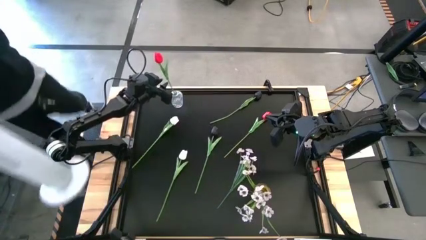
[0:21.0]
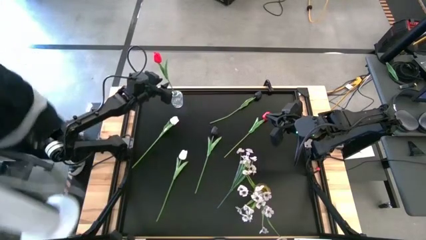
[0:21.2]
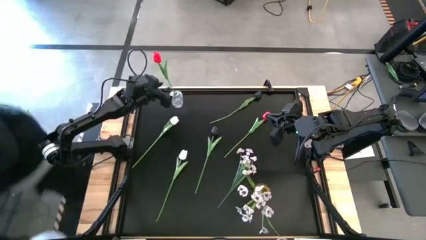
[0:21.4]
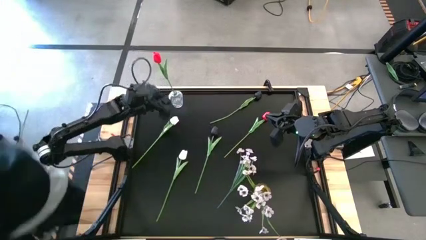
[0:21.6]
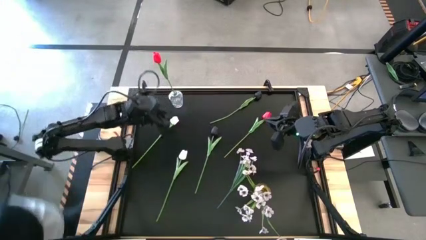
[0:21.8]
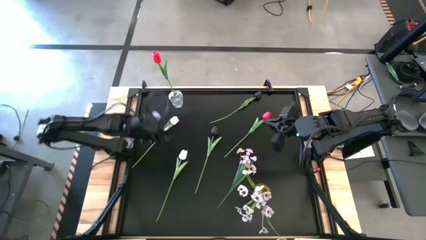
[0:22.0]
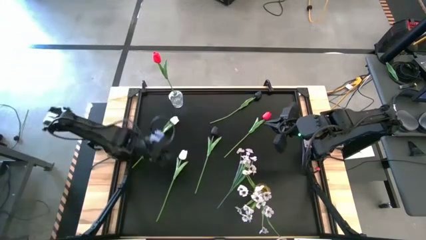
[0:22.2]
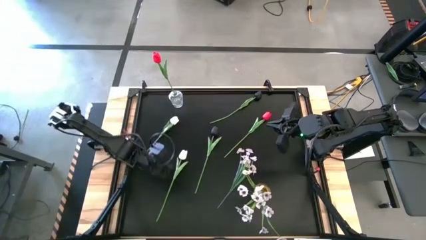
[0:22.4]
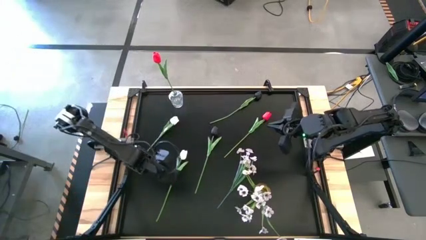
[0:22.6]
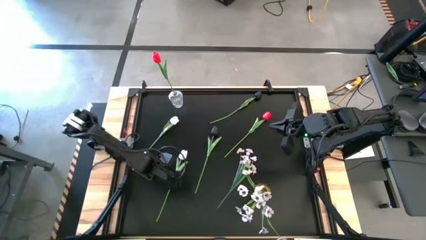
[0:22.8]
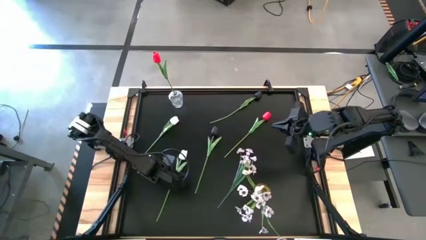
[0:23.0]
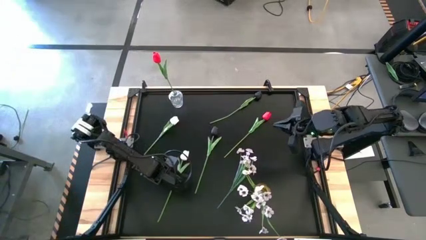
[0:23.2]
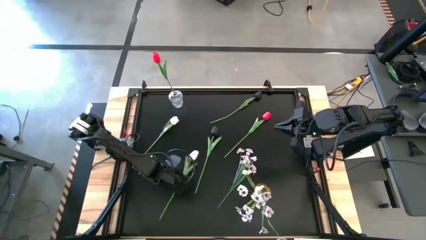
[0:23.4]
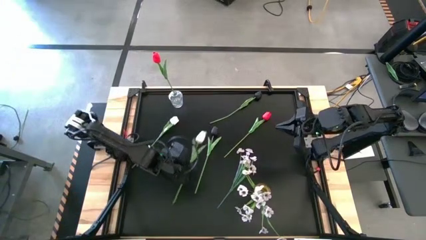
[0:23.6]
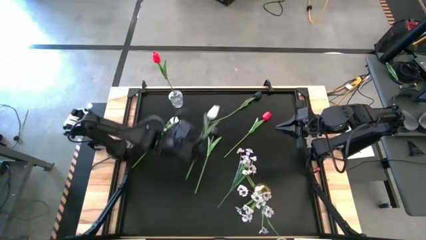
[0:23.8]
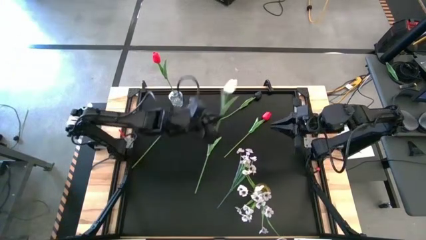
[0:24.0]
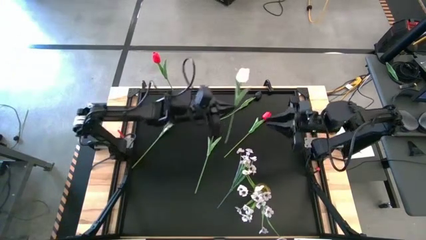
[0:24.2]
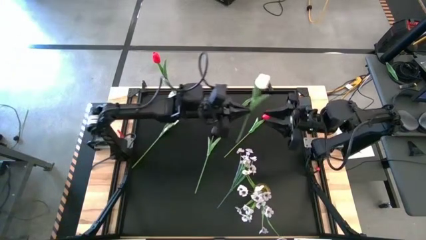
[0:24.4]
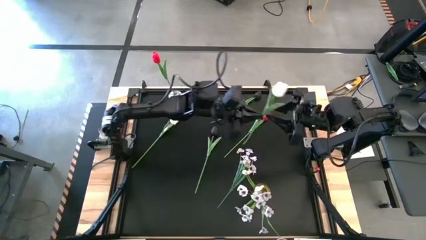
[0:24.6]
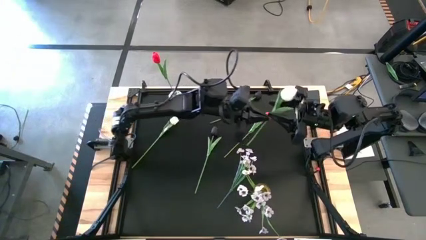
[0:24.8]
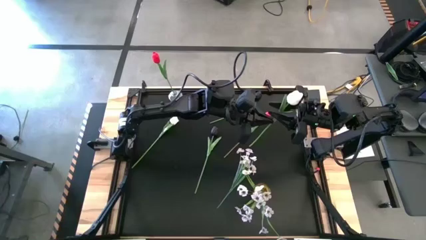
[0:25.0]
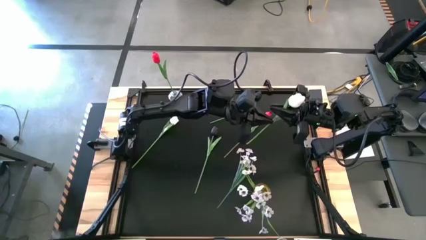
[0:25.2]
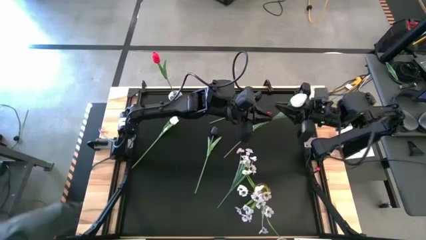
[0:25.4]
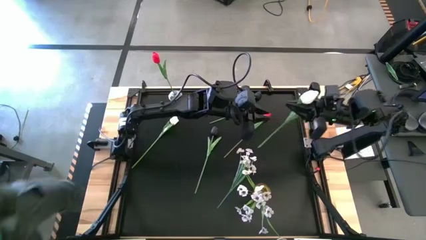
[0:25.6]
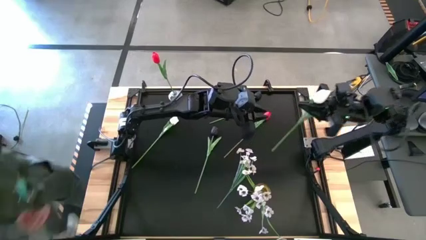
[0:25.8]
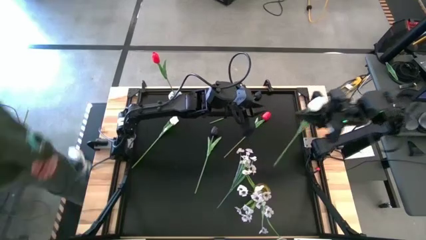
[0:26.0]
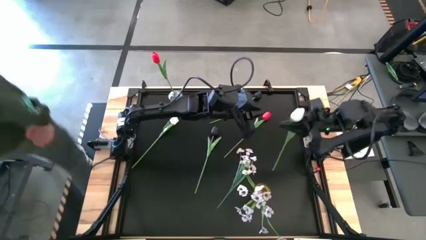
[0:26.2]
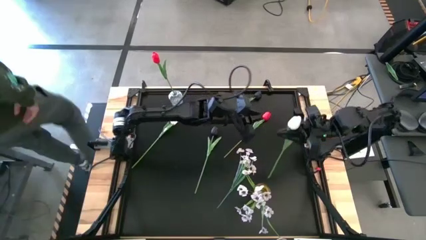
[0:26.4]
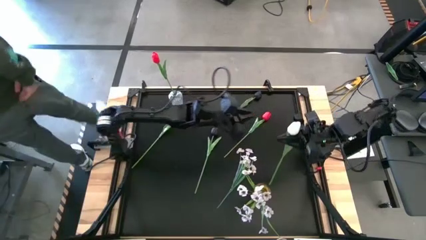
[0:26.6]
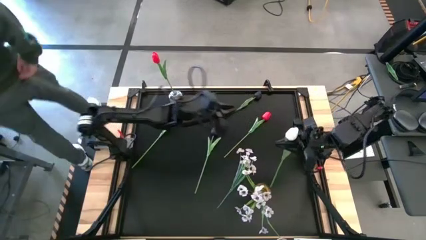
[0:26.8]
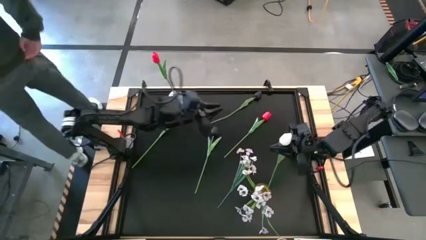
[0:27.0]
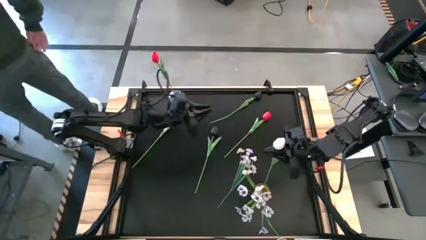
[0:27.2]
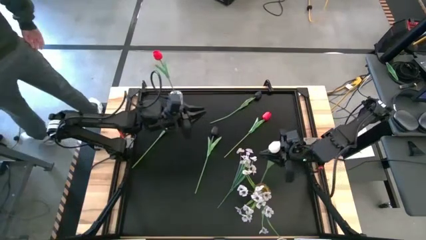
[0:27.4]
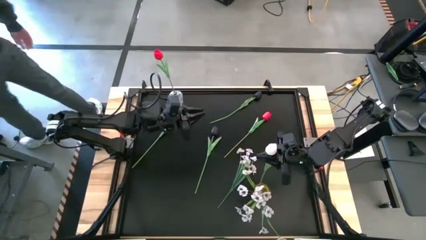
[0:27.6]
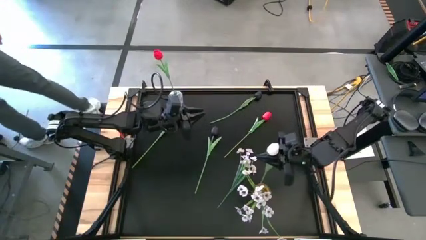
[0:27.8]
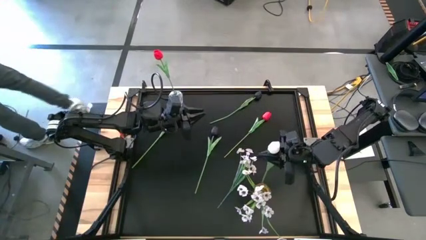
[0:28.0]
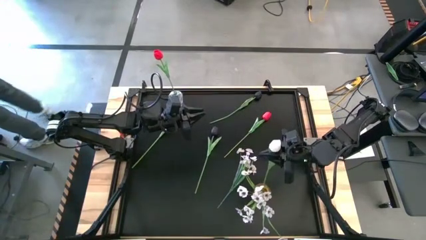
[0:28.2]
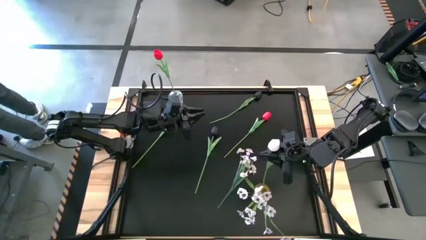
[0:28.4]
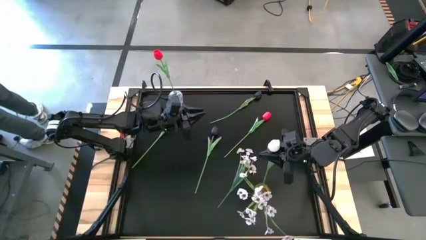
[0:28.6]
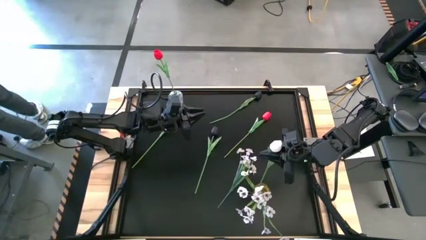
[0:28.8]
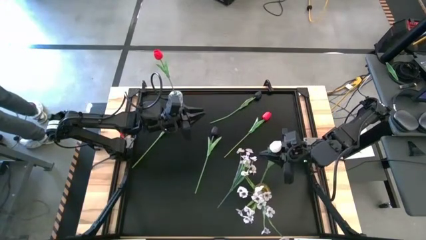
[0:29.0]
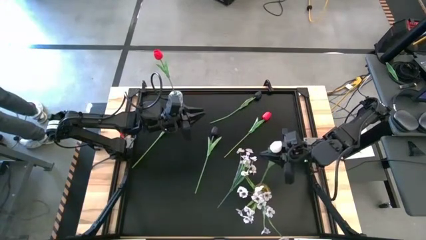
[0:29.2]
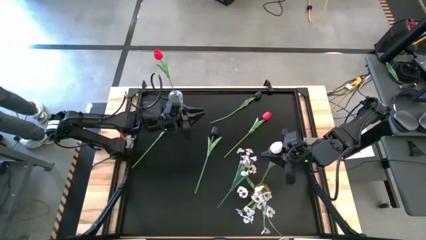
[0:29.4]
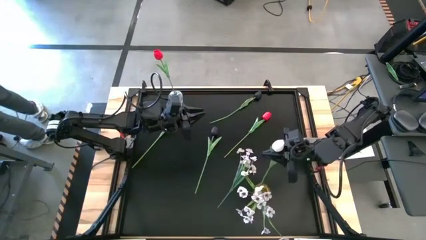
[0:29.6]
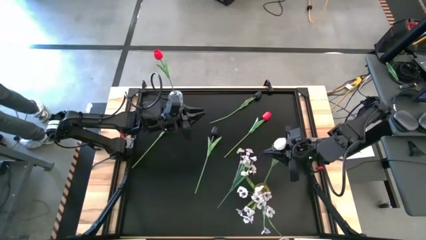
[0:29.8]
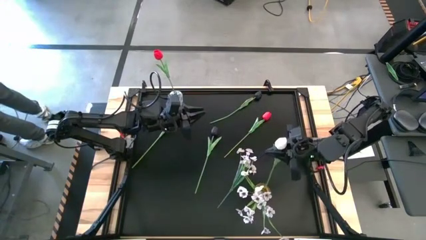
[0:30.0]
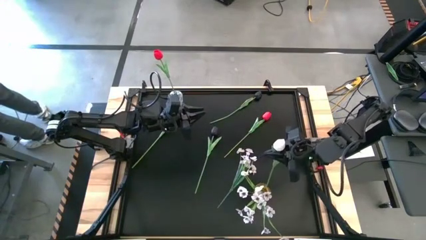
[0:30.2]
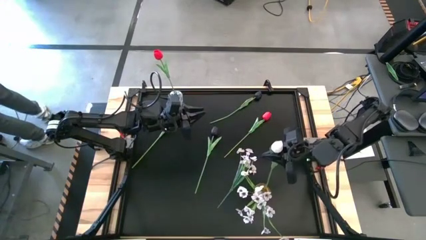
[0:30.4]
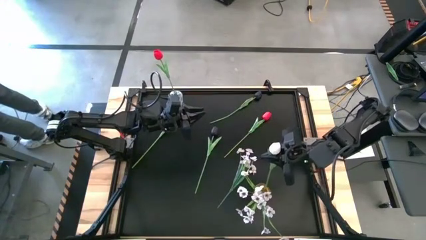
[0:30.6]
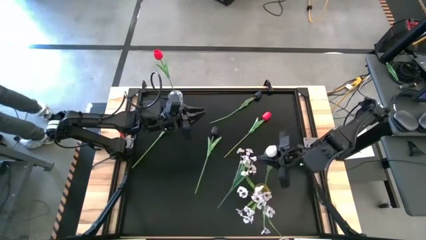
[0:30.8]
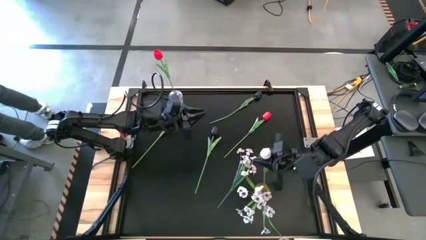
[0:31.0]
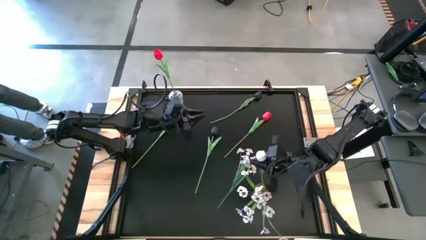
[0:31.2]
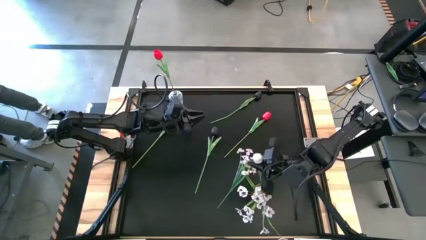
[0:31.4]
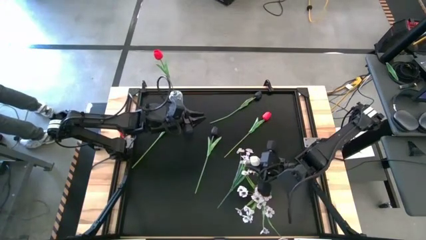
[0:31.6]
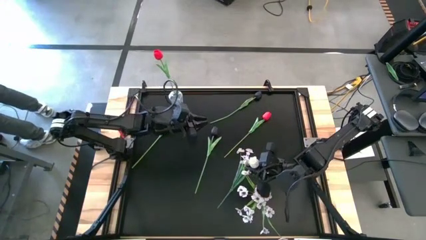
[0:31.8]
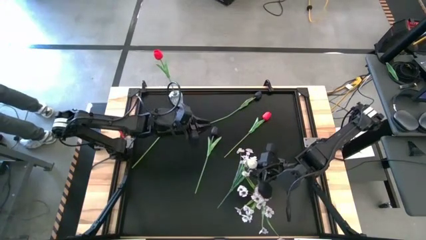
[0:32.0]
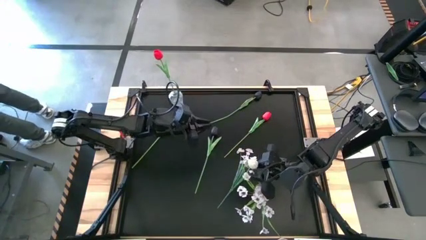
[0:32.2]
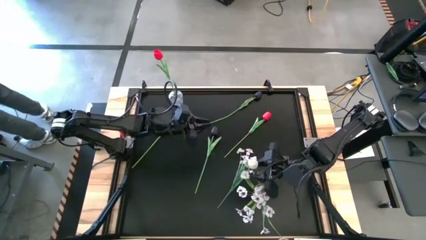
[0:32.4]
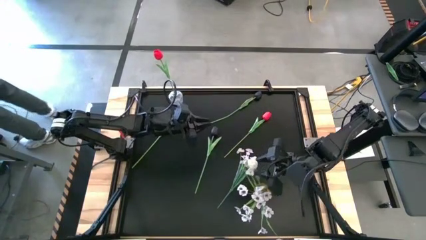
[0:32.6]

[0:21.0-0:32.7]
Task: Sort flowers into vase by color
Put the center white flower into the yellow vase

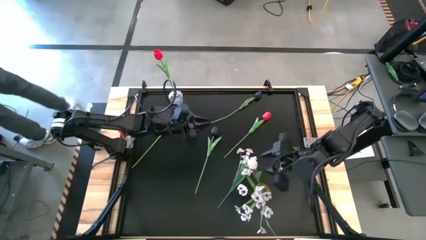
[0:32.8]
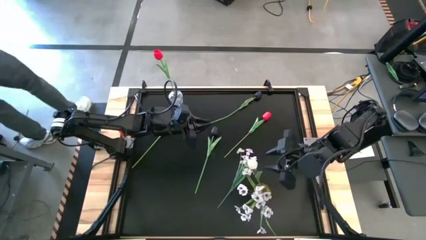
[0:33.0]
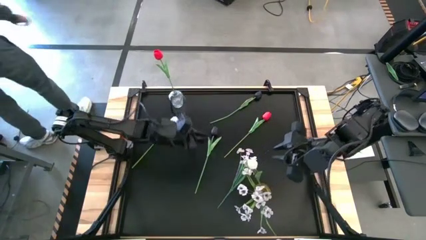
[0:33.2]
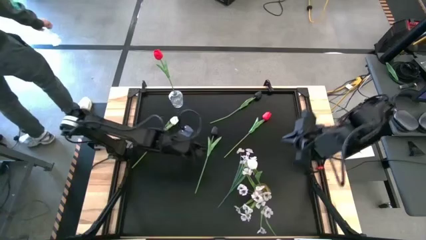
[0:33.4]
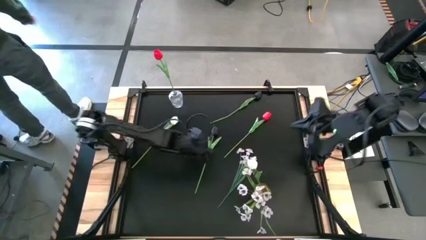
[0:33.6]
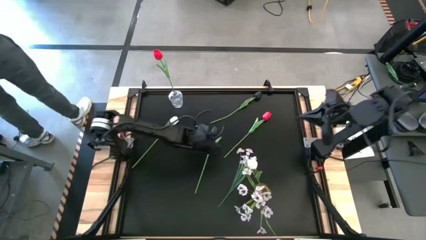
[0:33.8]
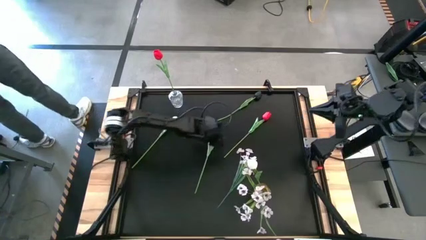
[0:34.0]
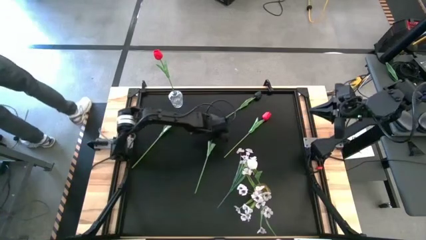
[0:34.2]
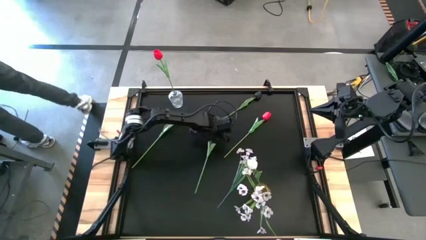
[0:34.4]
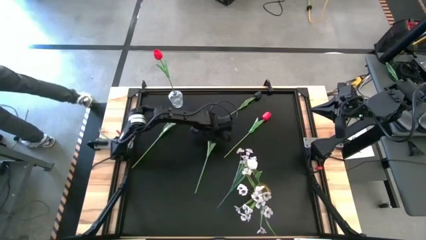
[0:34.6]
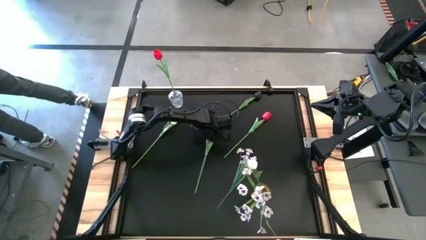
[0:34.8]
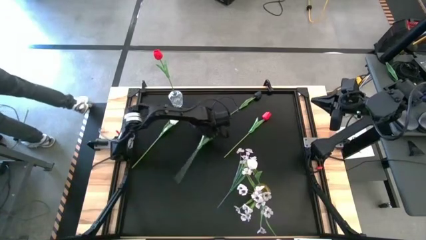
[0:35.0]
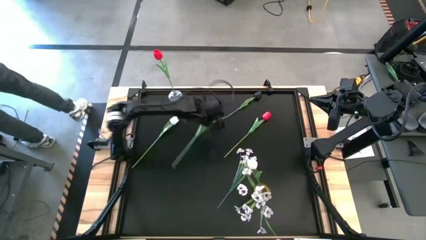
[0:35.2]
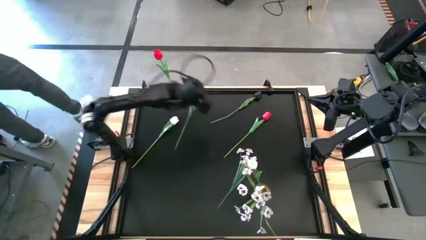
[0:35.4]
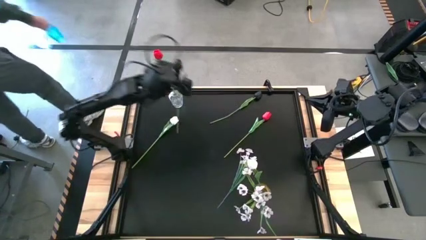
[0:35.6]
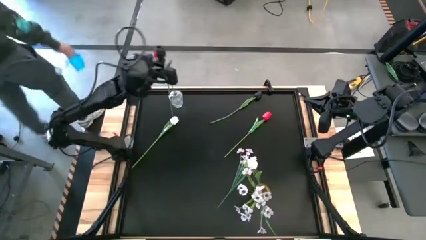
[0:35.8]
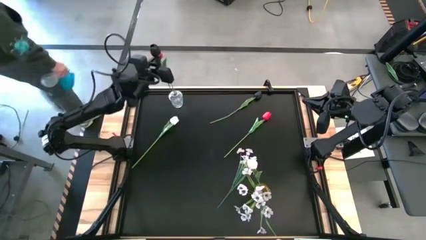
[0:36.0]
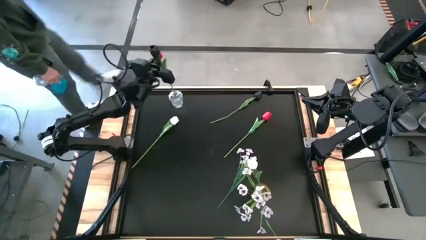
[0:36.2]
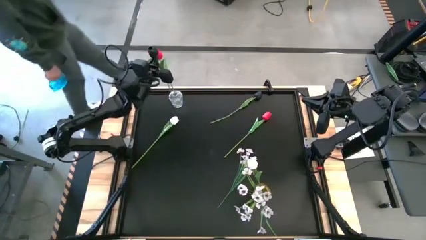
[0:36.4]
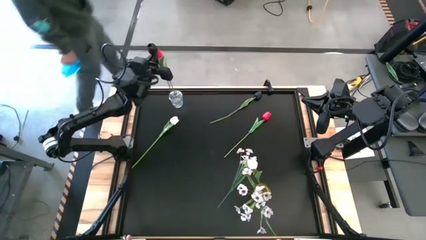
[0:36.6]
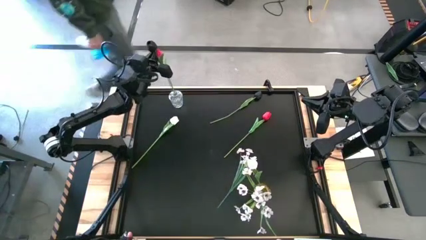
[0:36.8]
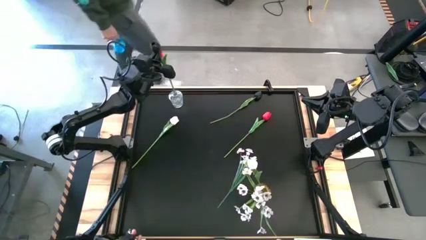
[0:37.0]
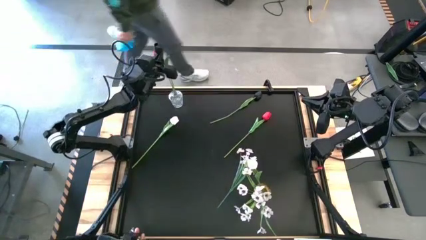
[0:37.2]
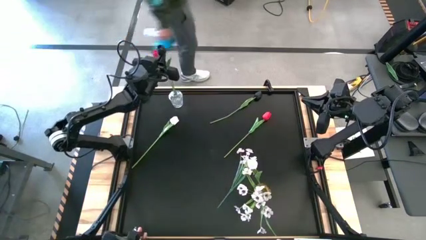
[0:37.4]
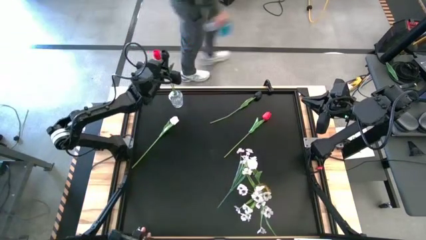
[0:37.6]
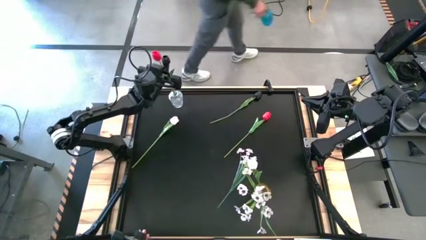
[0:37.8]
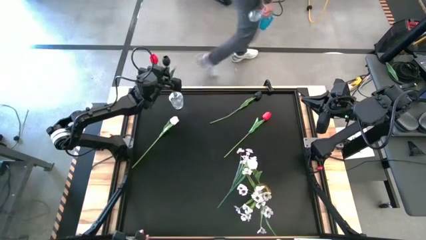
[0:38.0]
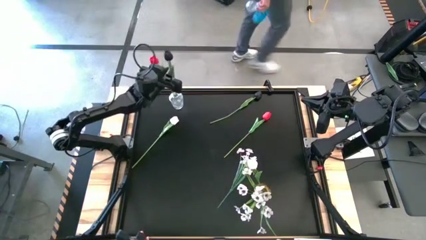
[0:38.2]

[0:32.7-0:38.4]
Put the bottom black flower into the transparent vase
